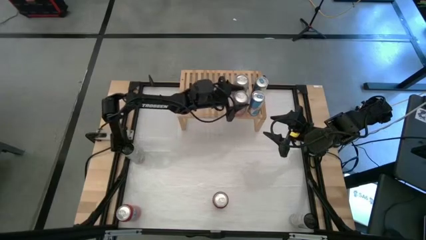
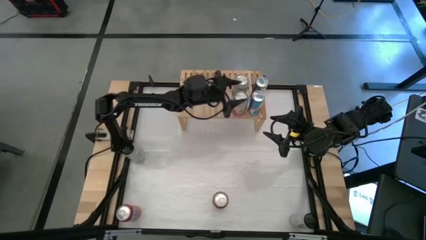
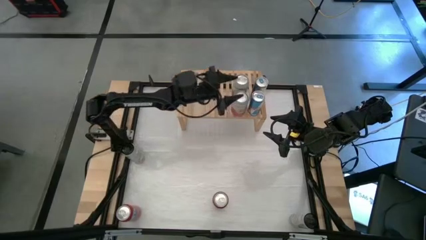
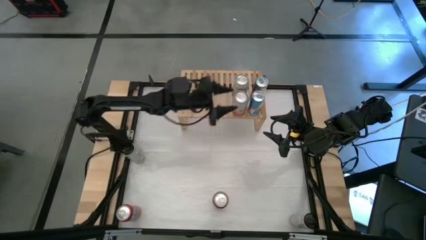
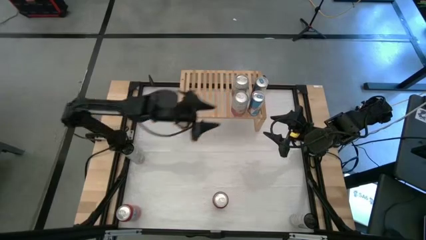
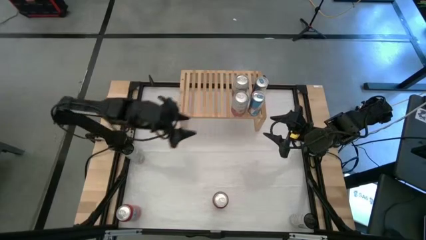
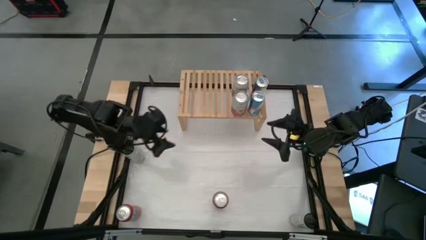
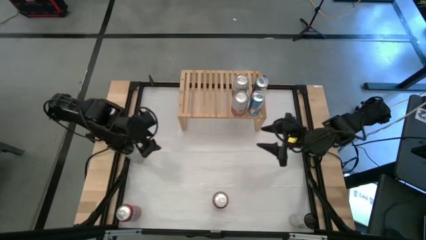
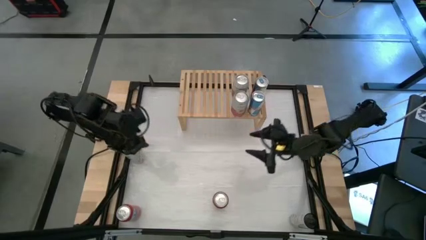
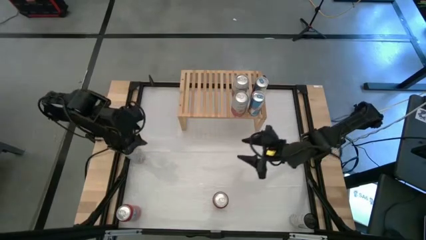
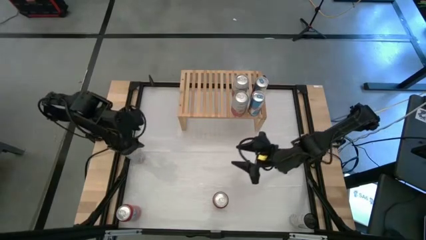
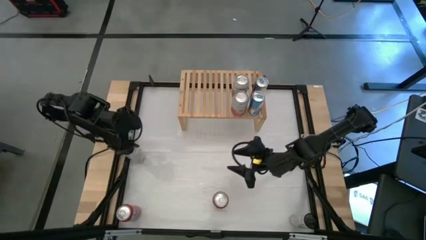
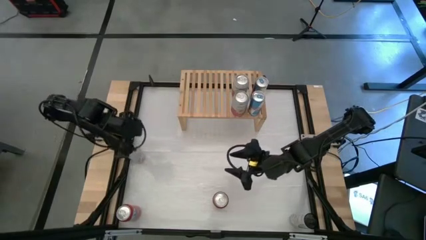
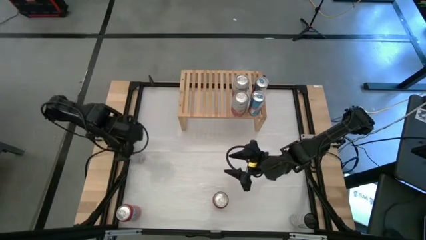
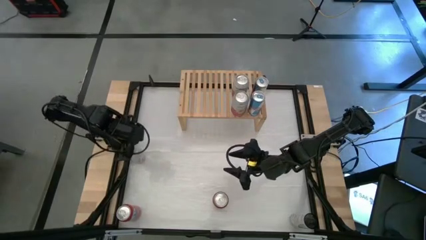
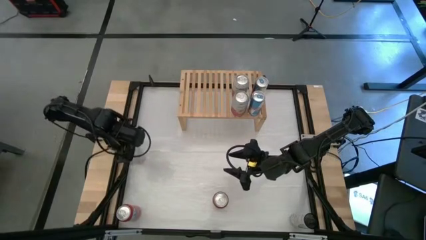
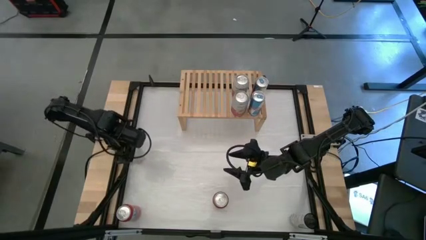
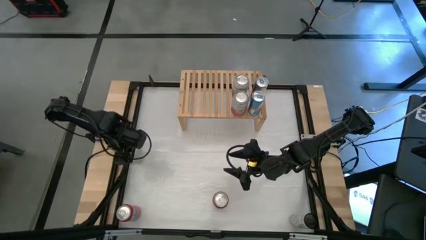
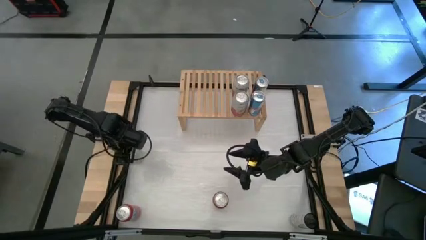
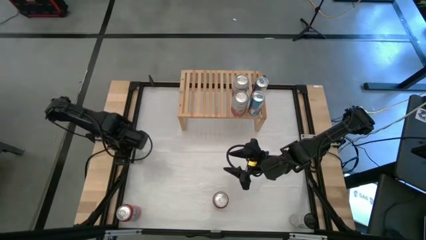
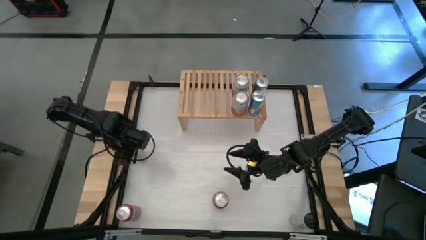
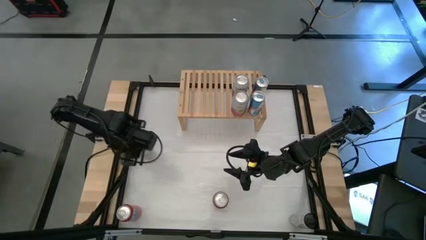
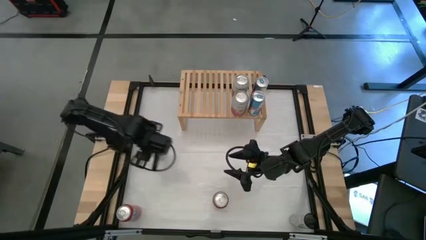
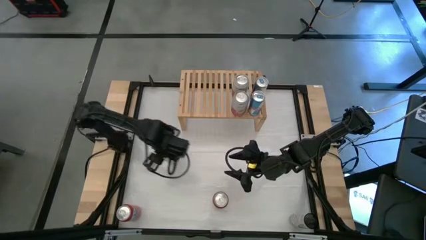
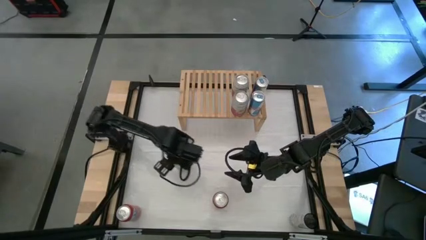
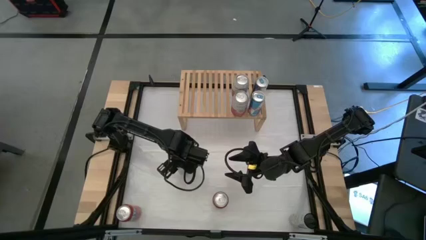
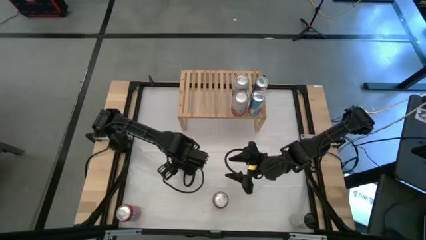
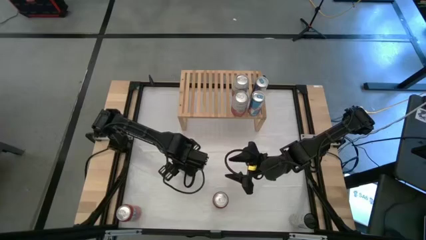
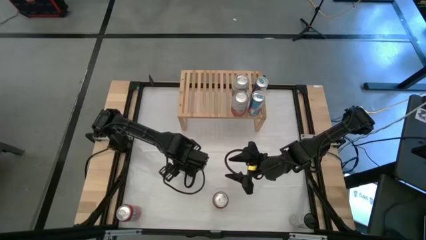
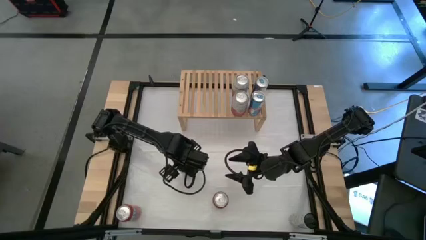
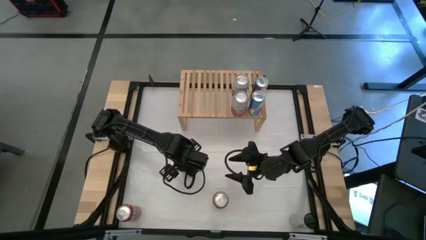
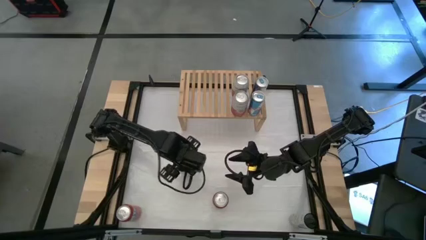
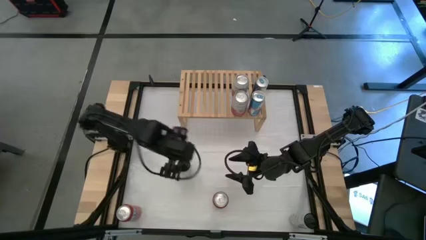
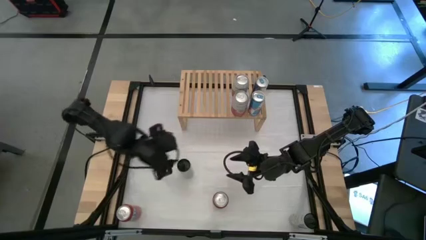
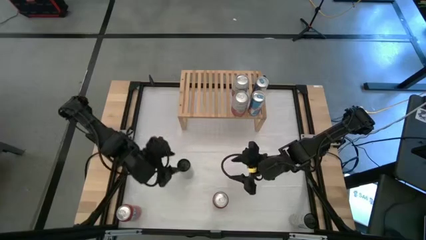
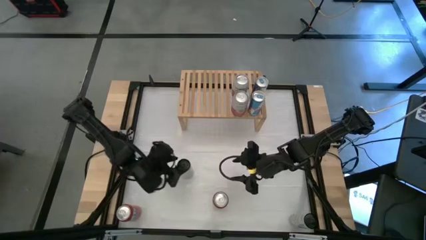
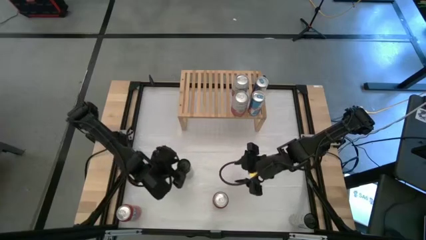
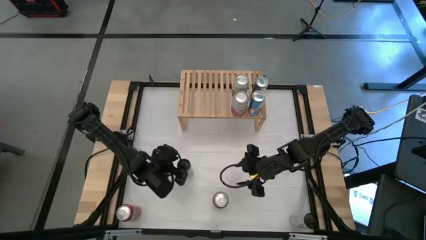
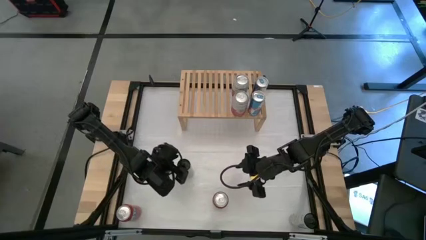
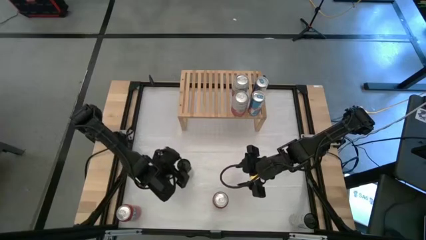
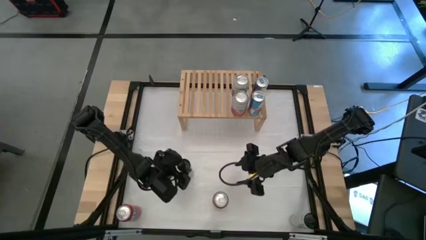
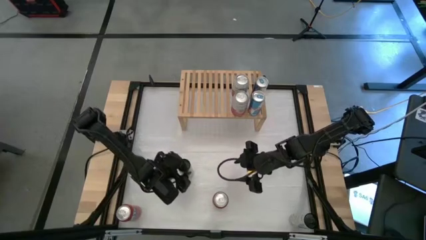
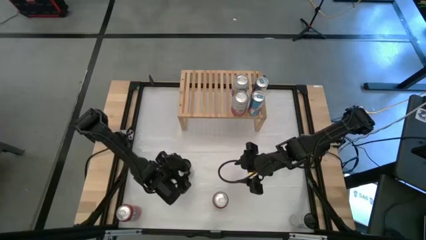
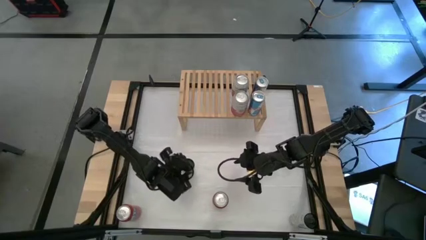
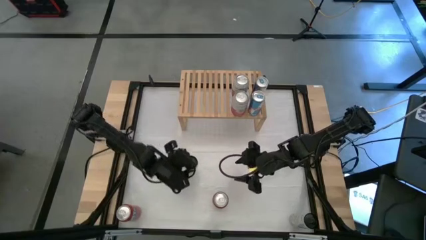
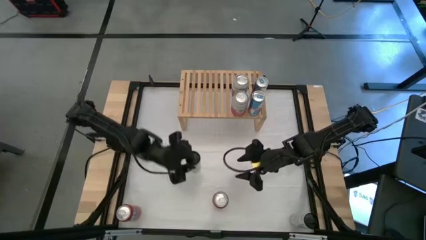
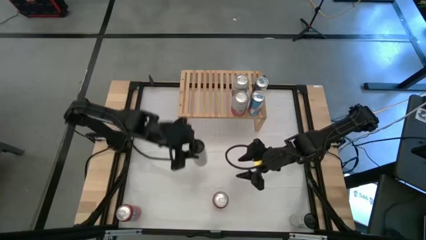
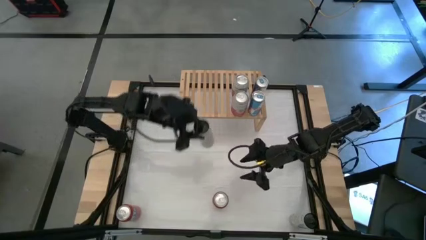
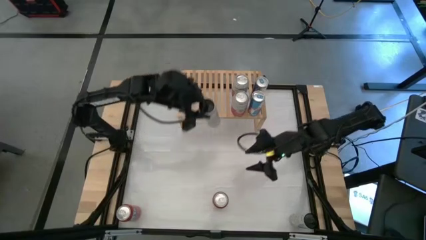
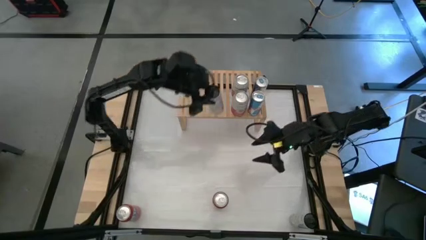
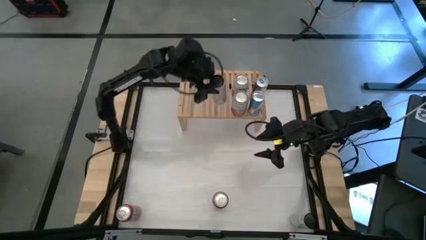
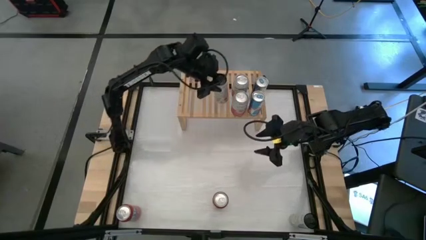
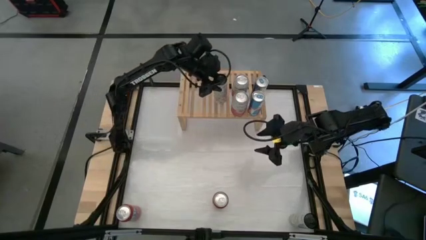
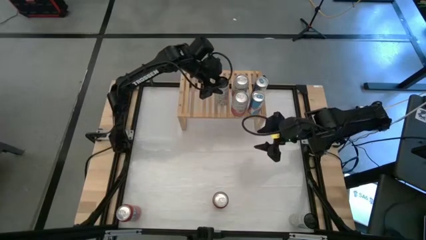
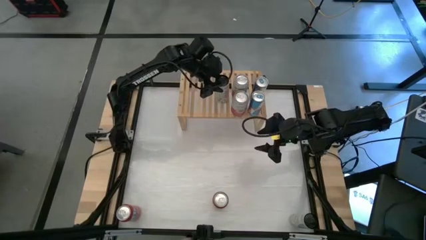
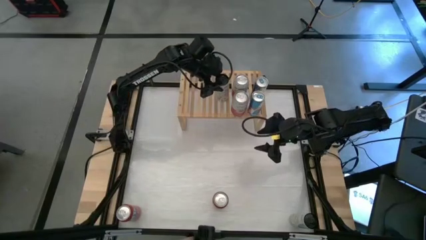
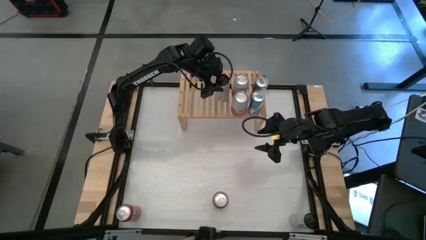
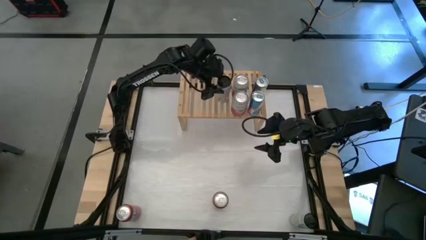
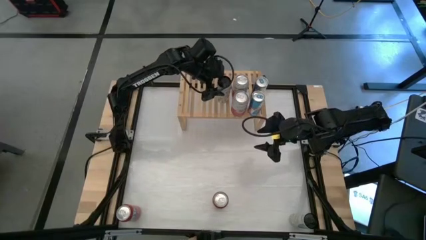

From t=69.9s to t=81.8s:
Task: Place canned beverage on shelf
Put the top white yellow soda can on the shelf

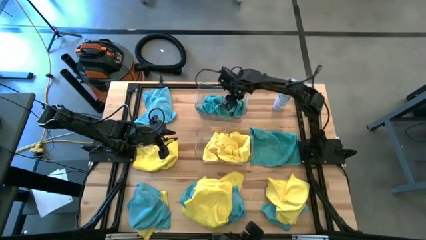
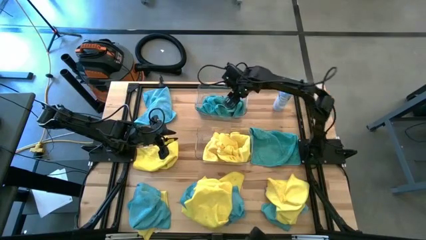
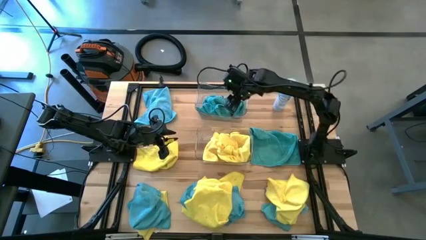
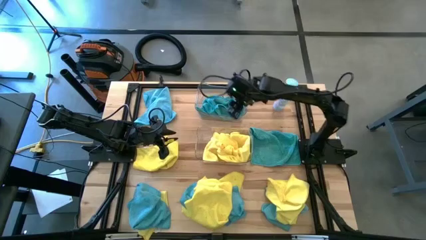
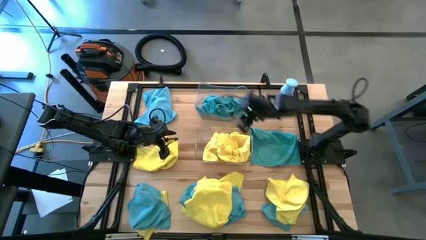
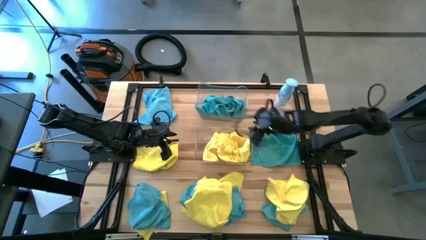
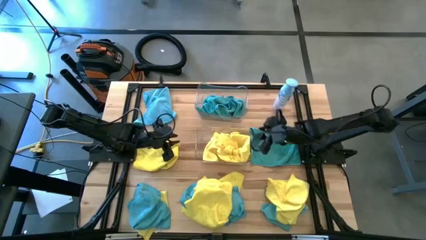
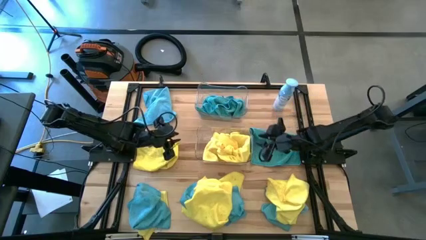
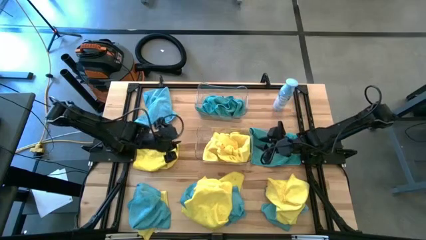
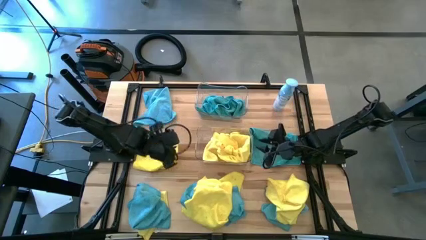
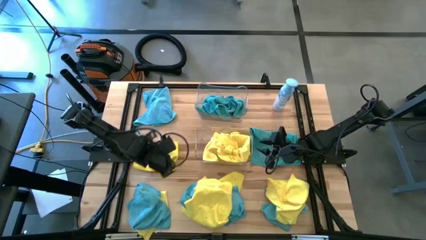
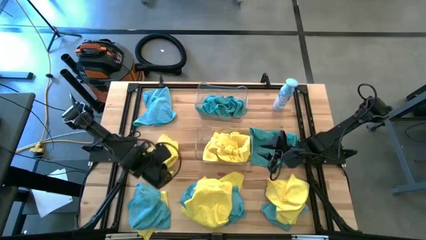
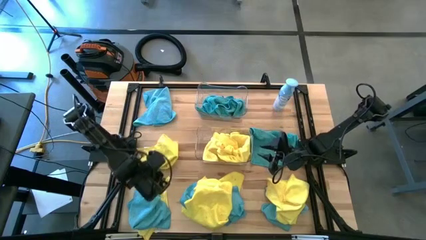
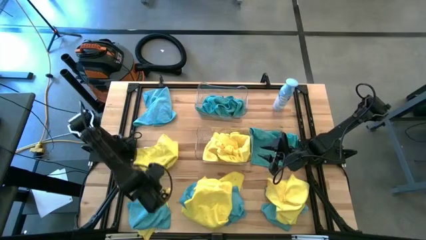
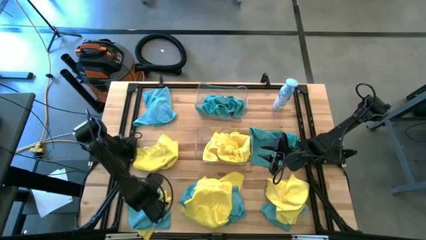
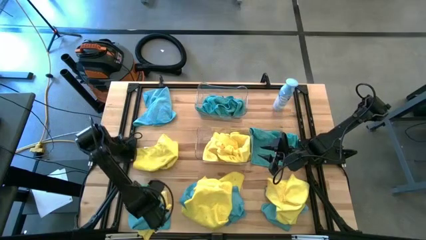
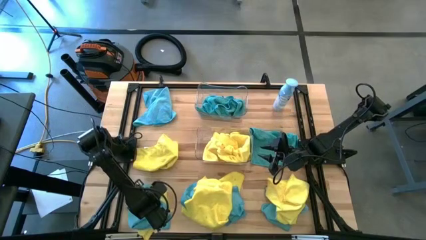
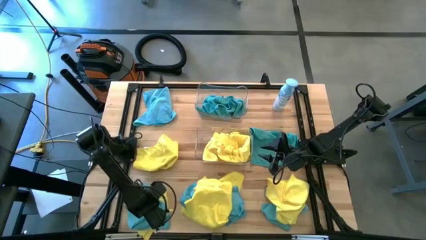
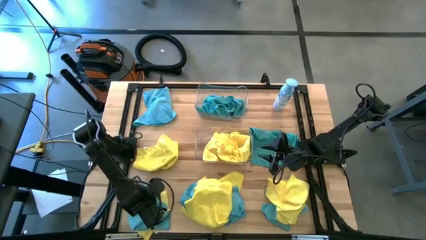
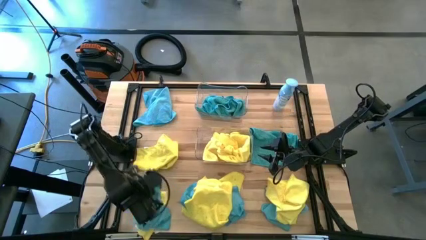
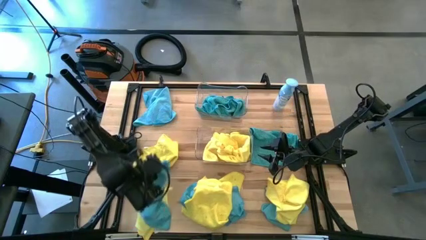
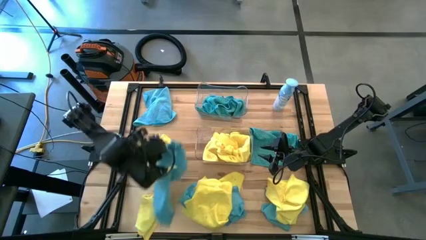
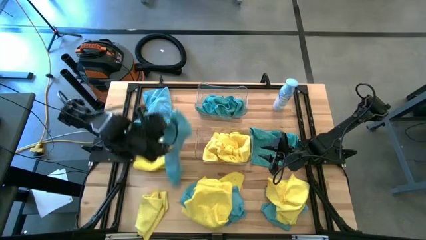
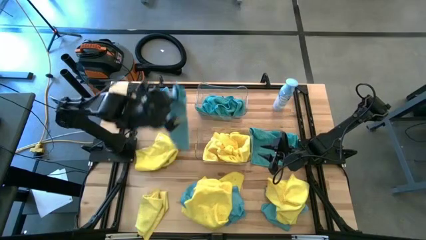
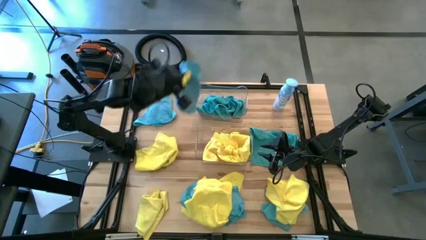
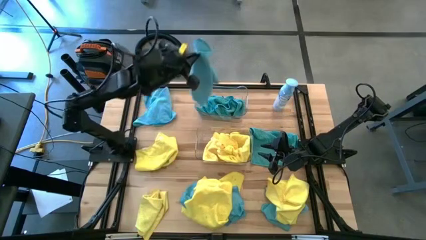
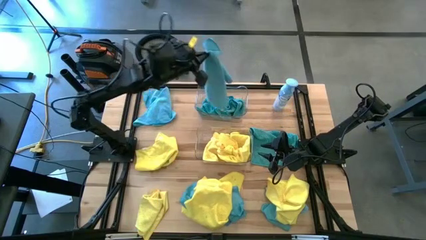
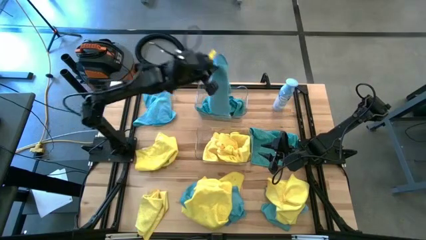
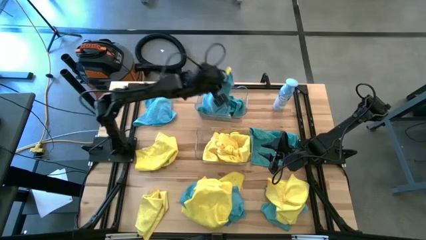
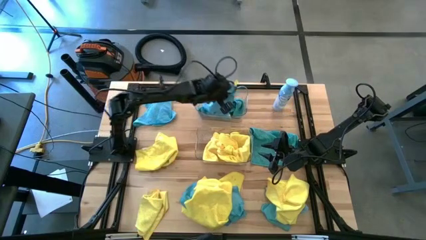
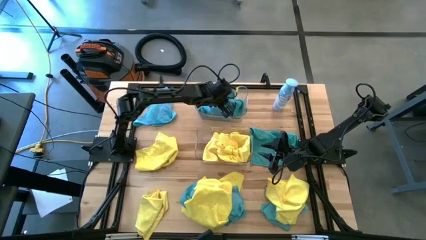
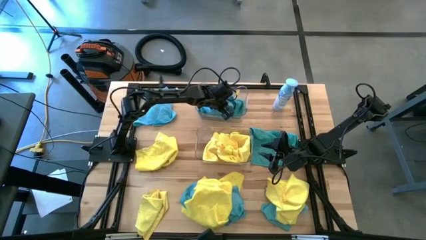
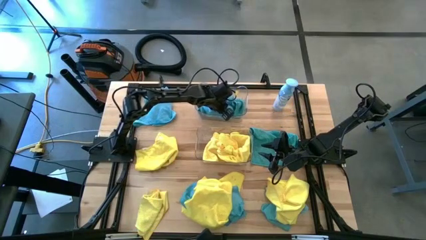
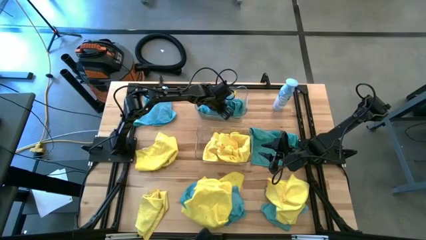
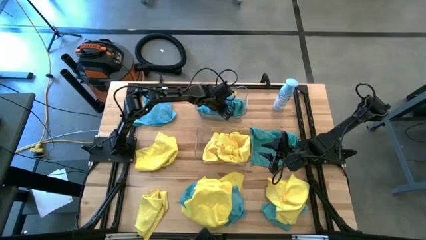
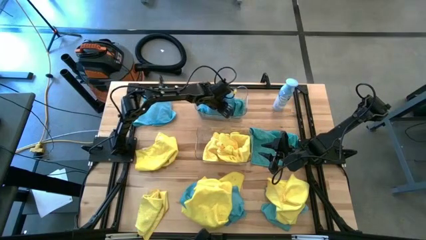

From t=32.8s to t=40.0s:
Task: Sort microfiber towel by color & place in baskets
Put the blue towel into the top transparent bin
